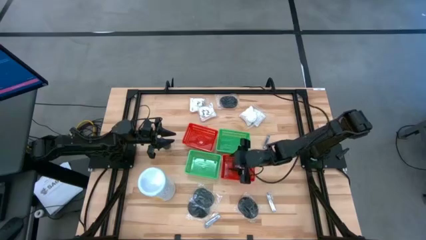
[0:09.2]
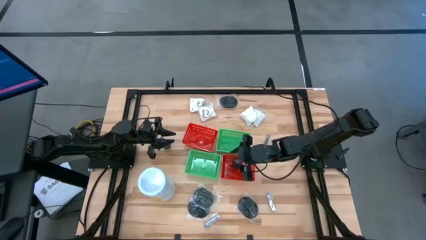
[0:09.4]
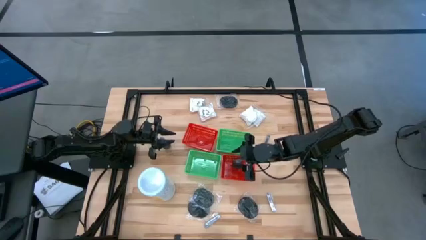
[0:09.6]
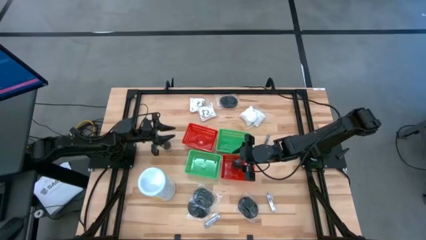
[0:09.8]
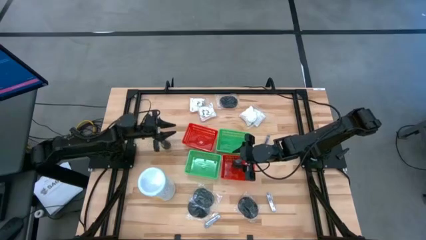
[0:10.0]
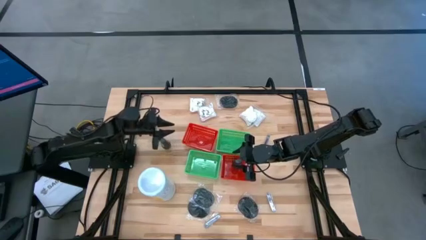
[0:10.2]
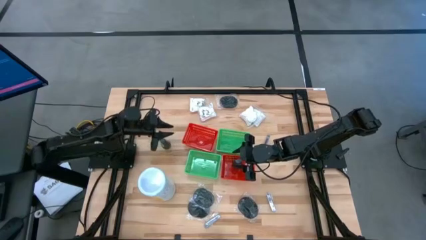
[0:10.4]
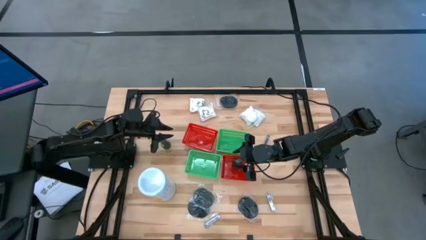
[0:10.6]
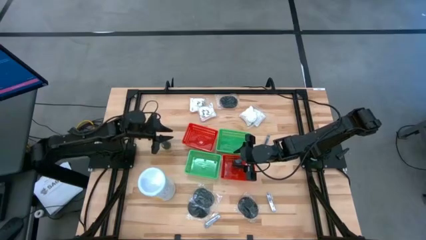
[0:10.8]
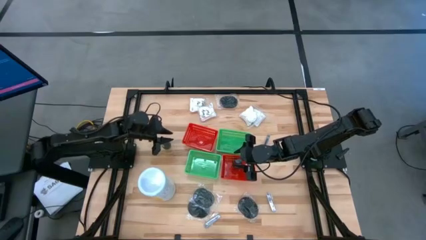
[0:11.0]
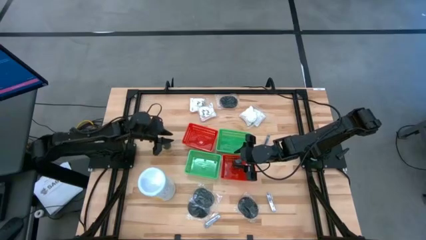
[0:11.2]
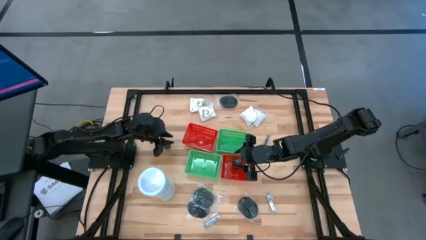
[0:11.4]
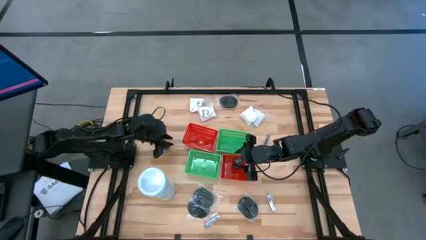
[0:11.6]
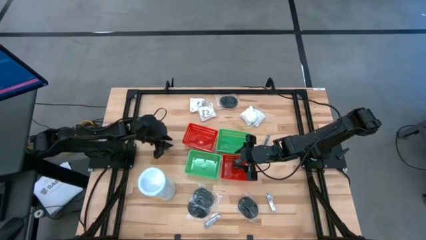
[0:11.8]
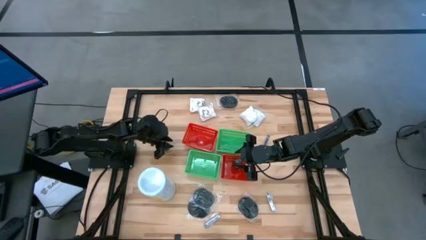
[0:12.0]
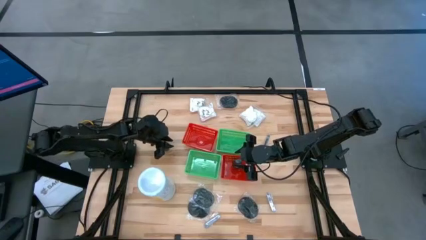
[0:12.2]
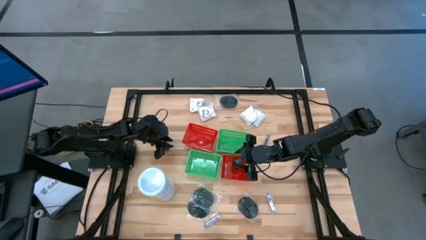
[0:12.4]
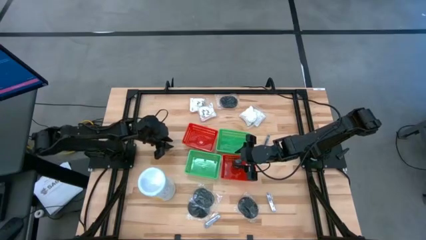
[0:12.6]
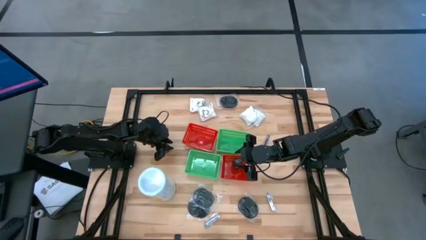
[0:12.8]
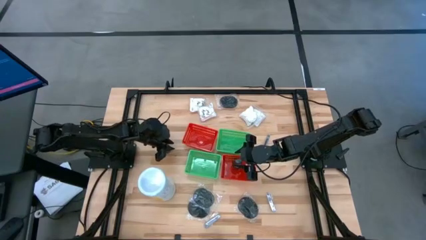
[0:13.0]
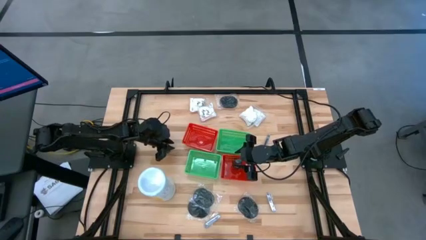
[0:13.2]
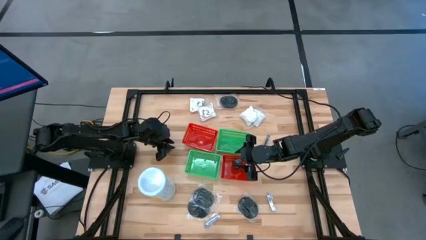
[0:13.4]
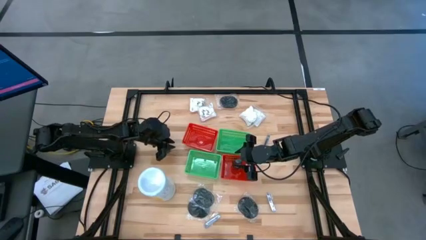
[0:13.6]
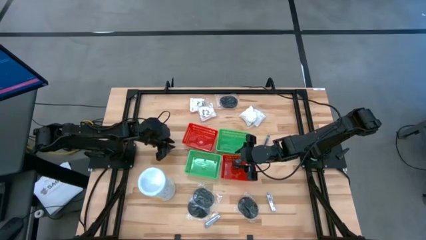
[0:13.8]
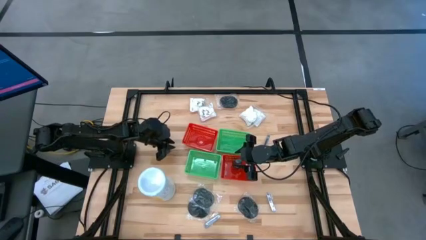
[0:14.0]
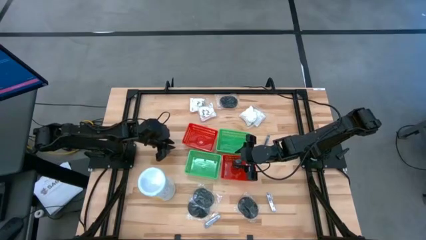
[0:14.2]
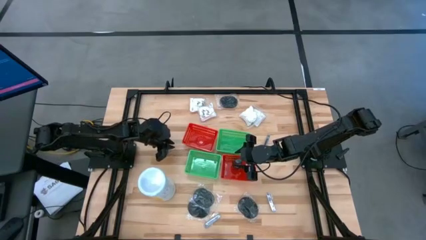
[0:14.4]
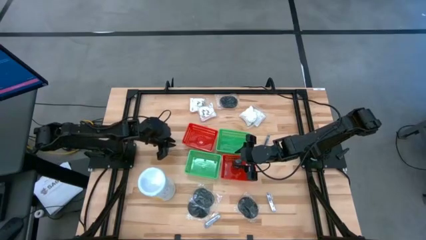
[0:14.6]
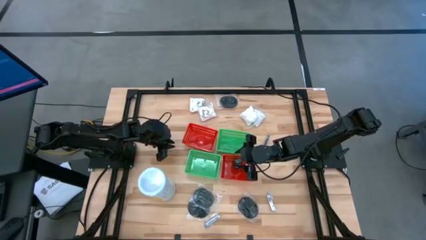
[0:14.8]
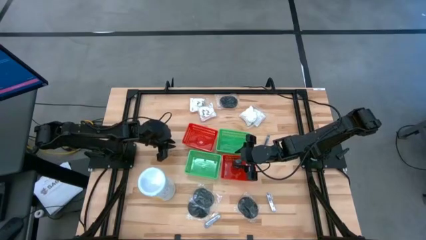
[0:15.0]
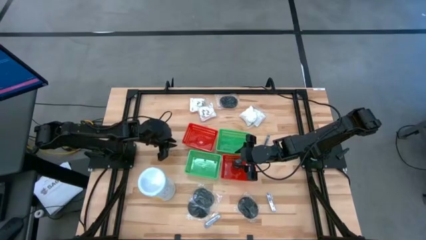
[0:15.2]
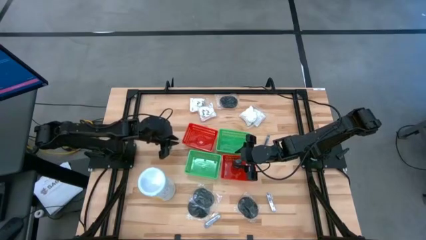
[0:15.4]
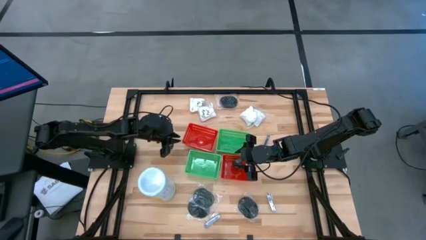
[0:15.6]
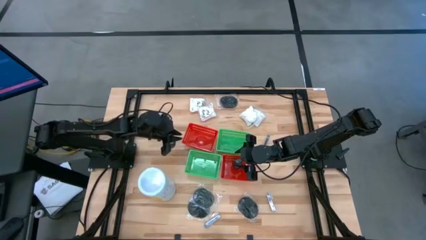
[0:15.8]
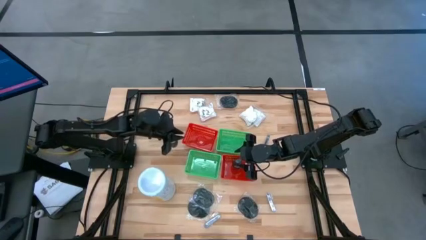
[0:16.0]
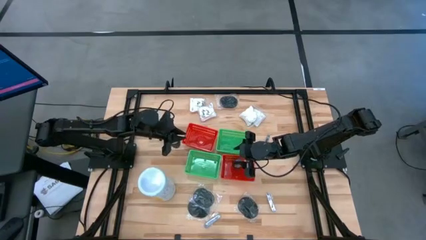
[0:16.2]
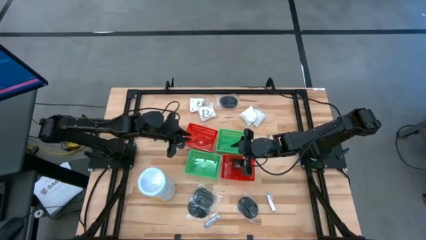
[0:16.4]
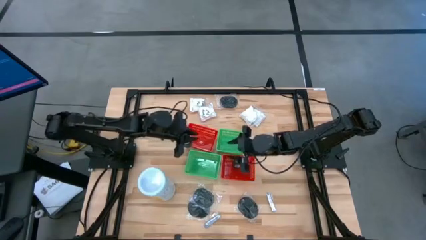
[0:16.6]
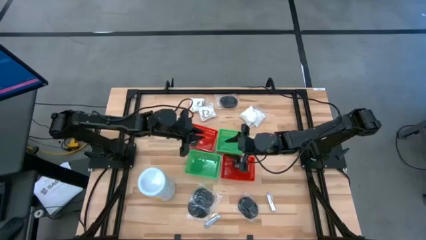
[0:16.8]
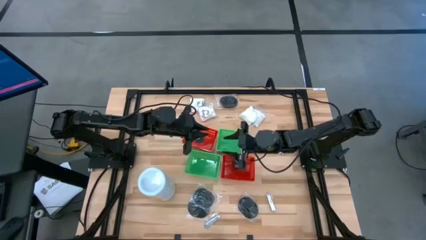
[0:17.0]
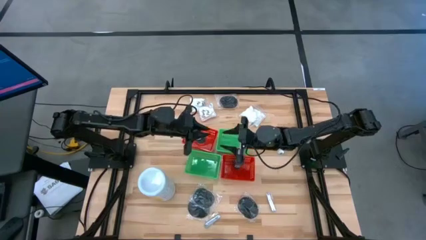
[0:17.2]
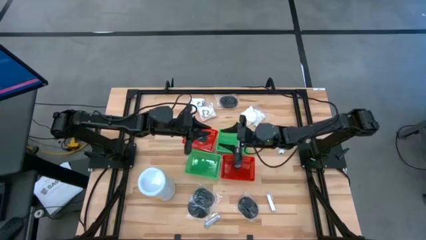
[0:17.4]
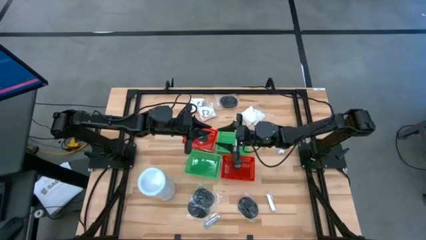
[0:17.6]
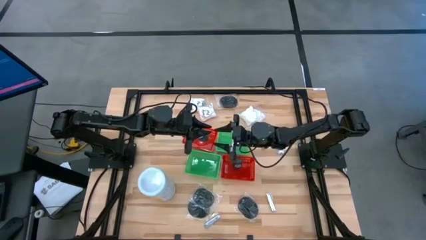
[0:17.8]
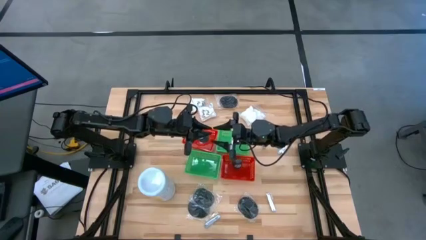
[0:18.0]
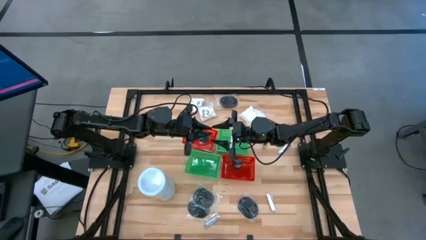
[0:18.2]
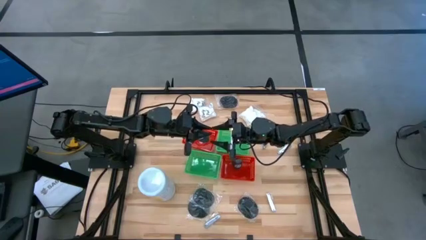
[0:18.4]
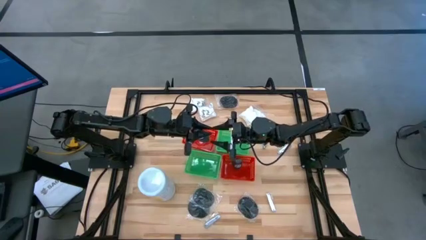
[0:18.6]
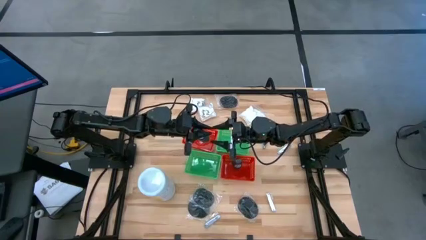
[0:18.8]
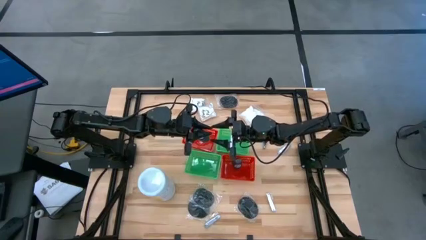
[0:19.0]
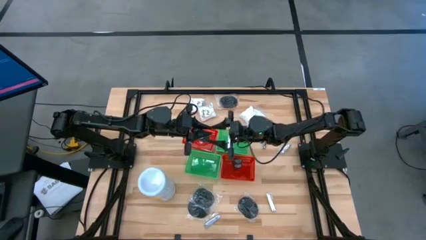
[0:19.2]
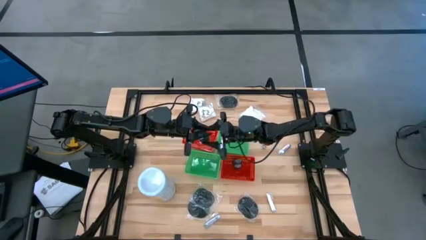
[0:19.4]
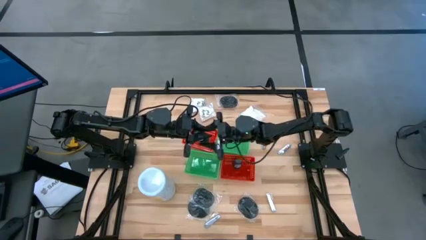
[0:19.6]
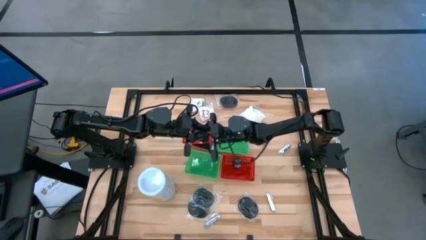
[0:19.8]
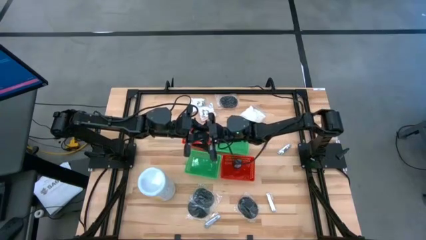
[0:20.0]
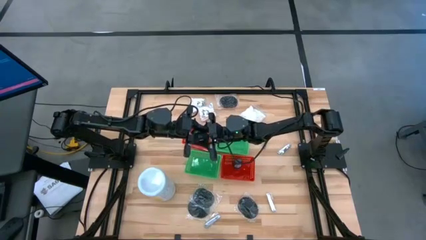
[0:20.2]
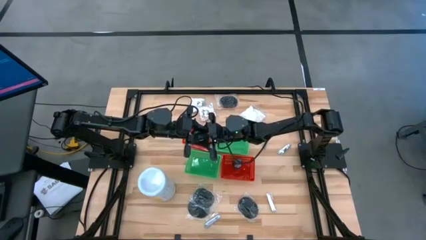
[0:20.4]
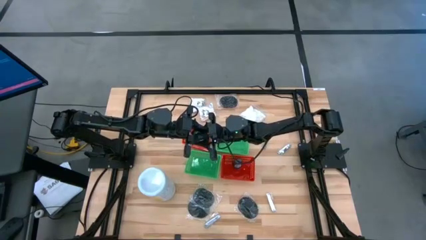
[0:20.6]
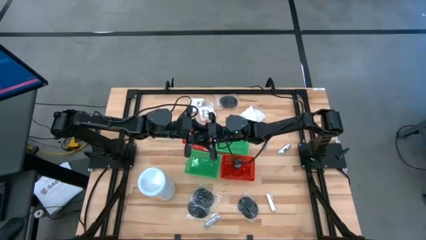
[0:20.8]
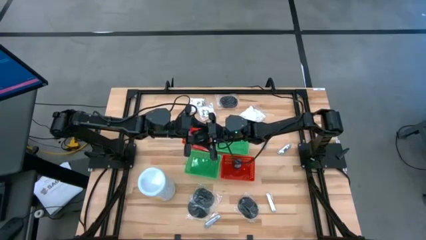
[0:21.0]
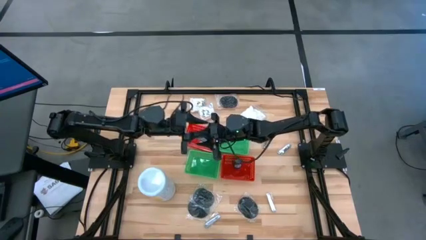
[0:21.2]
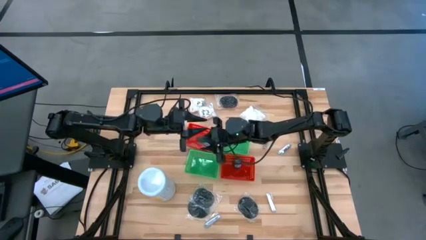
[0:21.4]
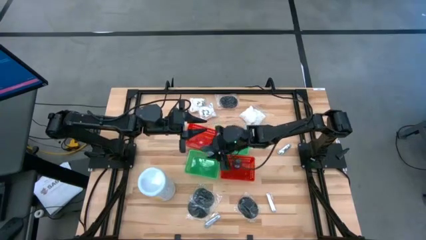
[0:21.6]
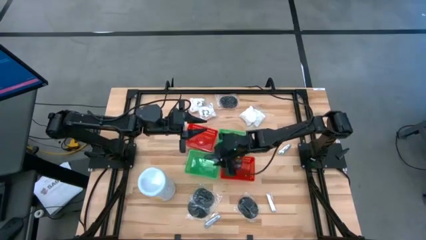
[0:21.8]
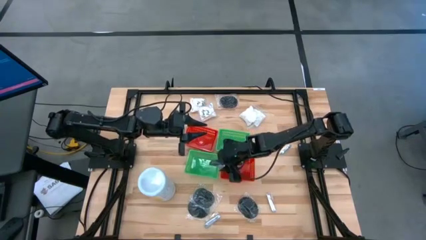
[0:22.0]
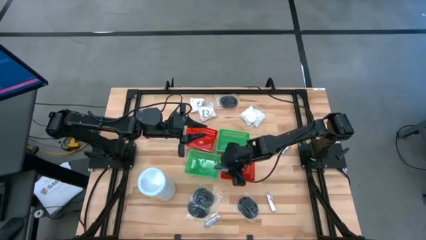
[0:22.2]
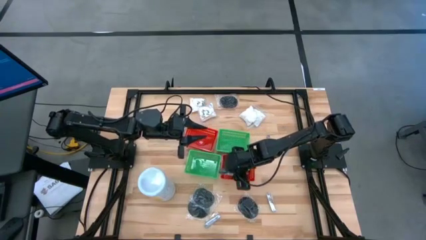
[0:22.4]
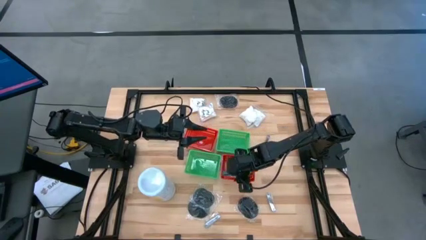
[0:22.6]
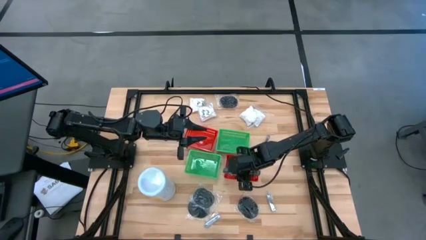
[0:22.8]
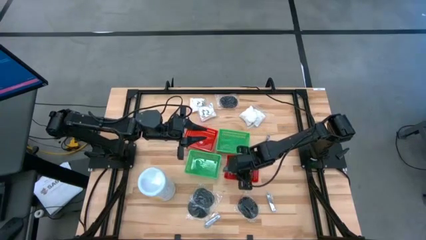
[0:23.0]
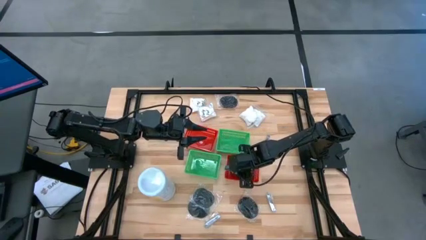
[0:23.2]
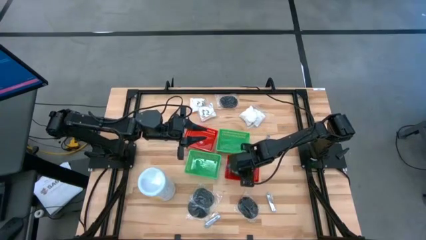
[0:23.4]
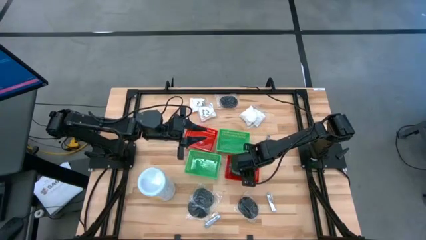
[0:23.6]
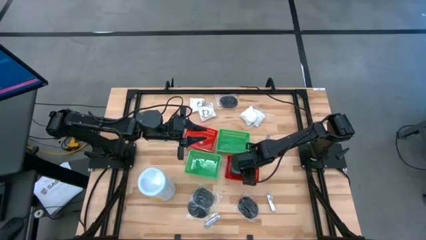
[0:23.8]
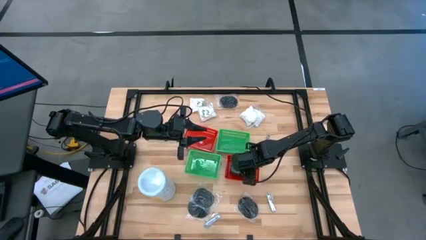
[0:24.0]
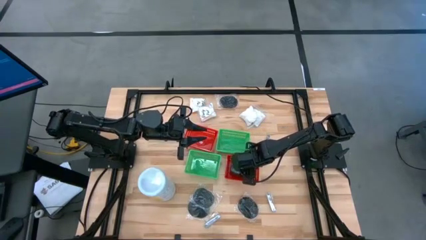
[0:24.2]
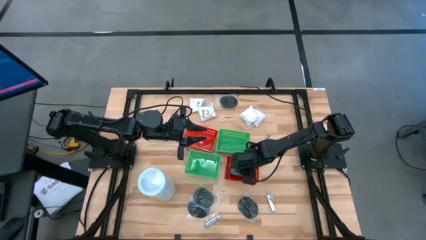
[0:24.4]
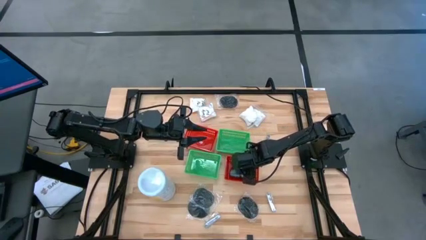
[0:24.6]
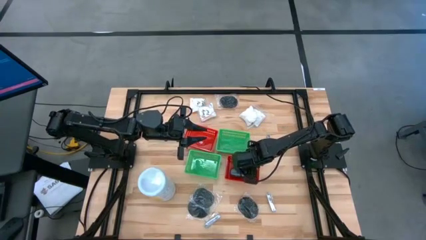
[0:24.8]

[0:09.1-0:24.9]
Task: Pick & Place Travel size toiletries
Put the black deodorant into the bottom right red bin
